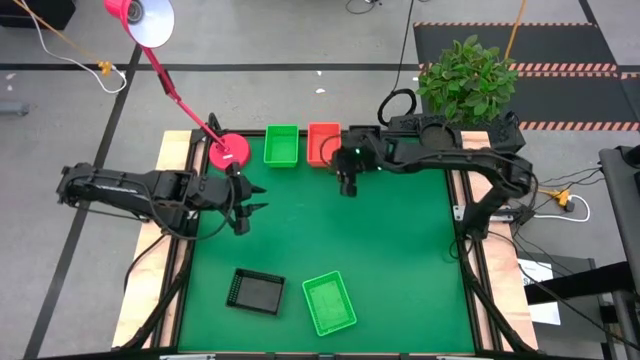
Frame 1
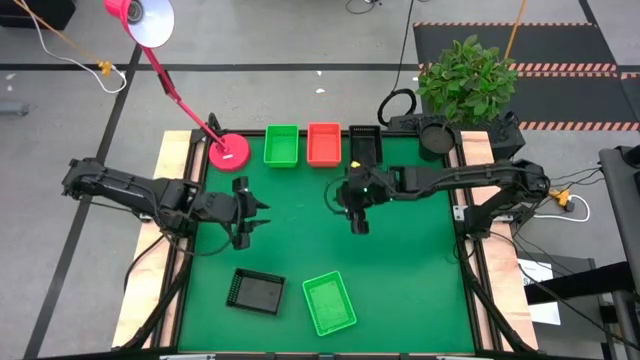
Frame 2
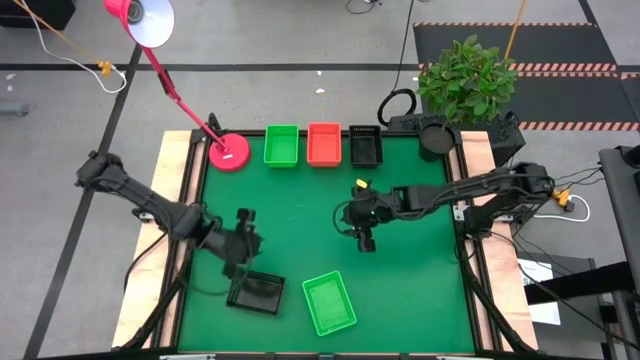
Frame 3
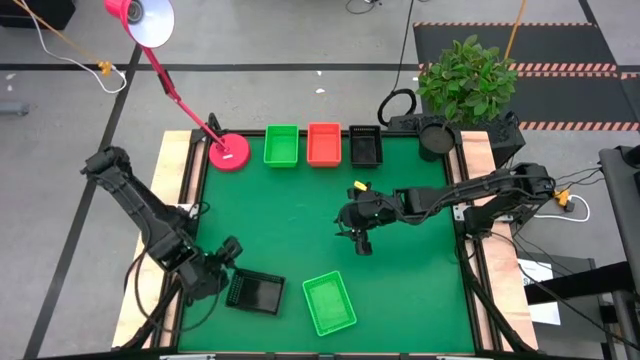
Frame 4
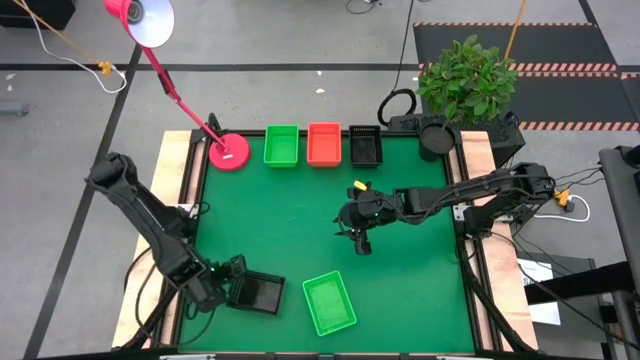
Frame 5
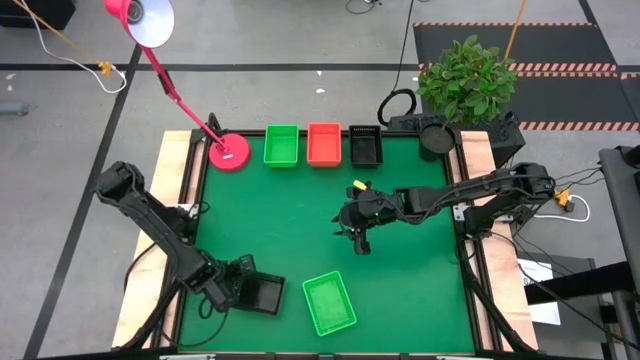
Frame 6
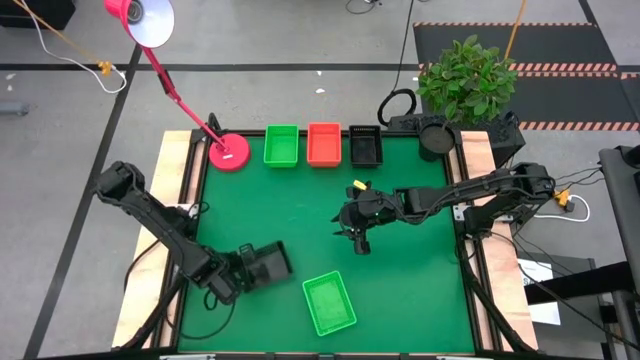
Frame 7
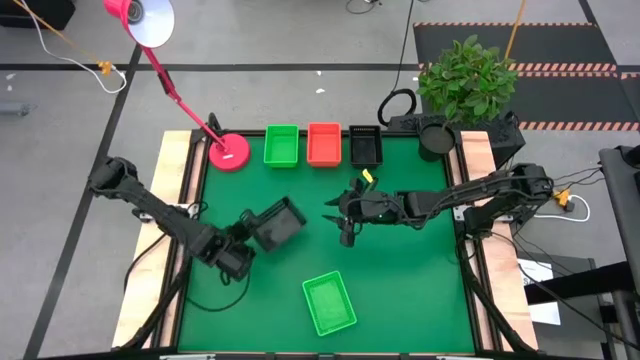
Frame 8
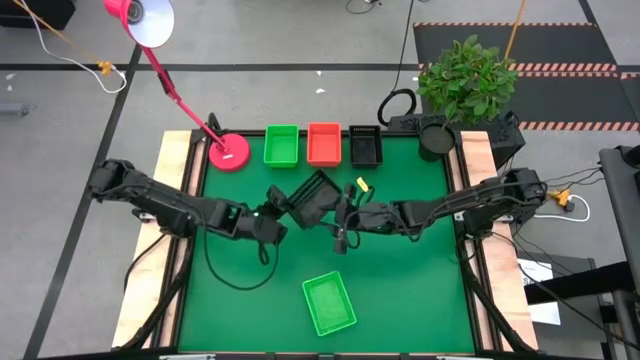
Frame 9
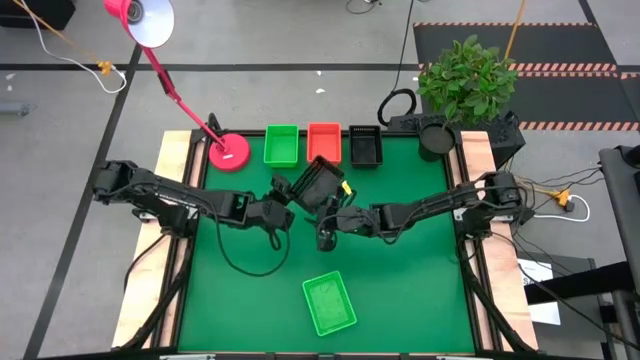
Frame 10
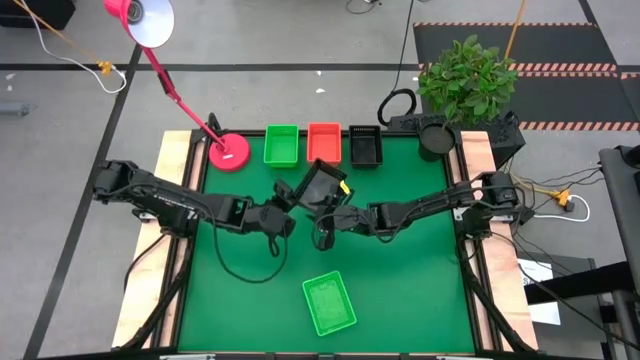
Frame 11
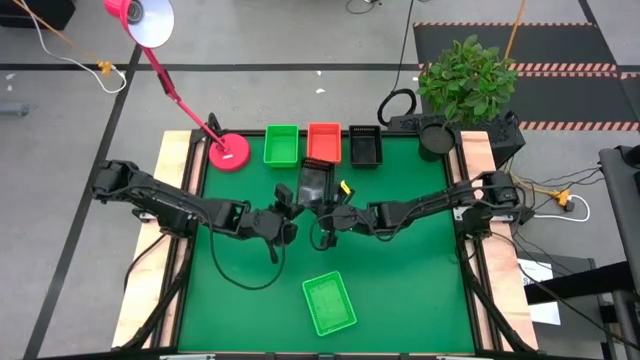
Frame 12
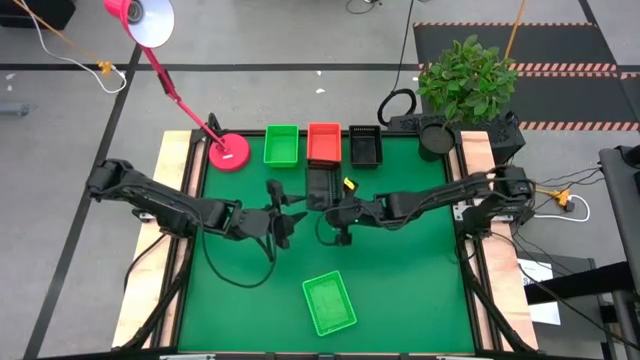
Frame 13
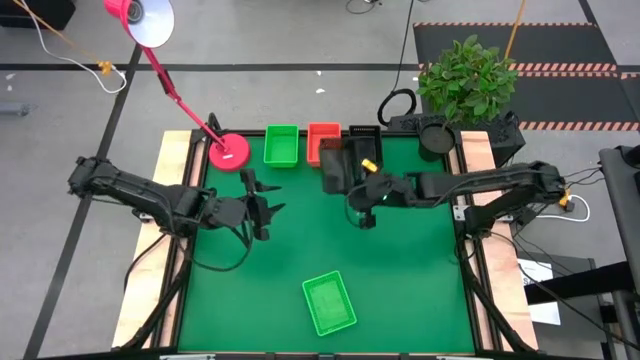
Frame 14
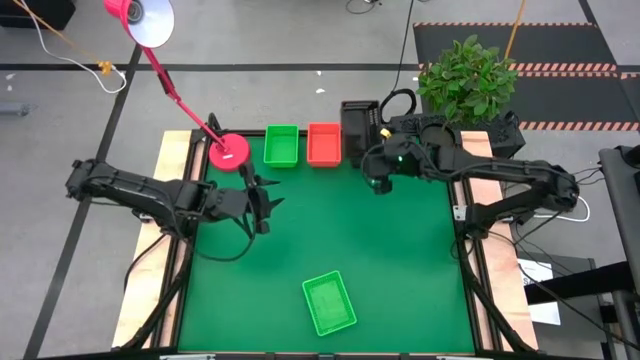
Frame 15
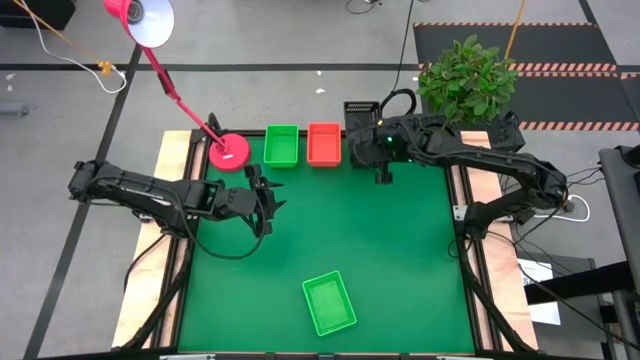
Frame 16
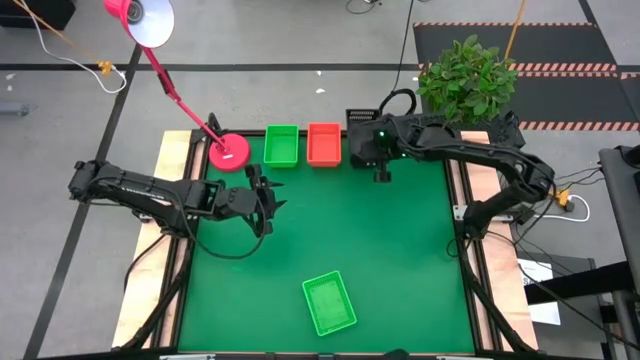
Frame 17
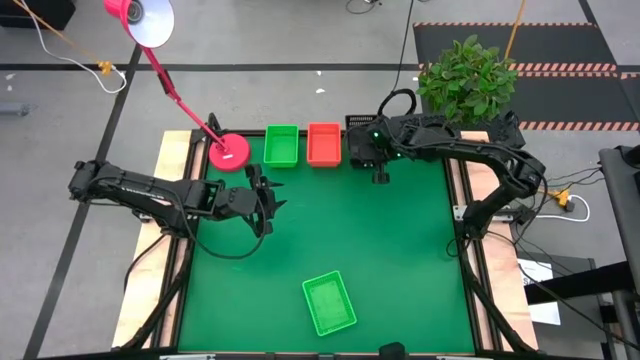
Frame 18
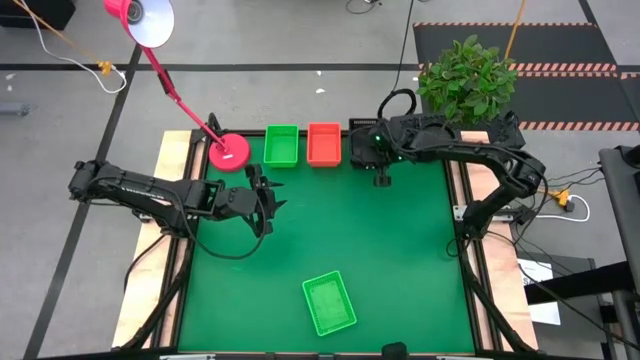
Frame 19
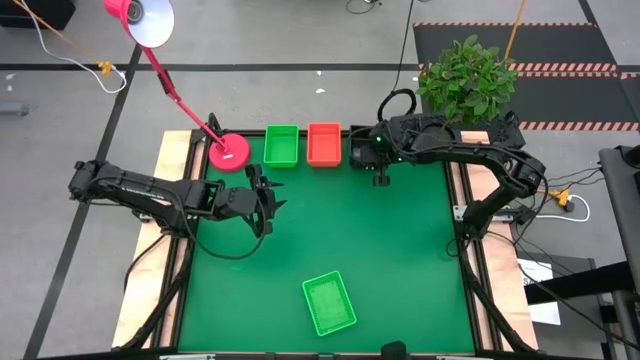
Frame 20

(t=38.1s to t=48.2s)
Stack the bottom black basket on top of the black stacked baskets

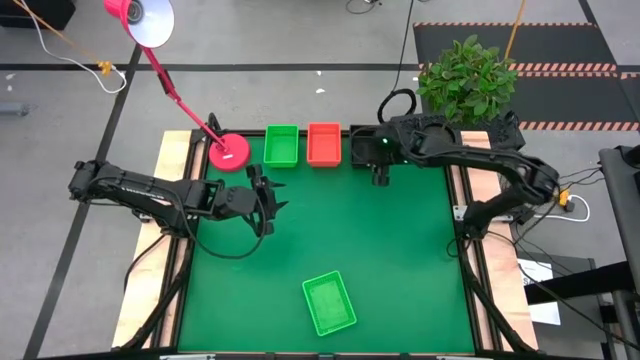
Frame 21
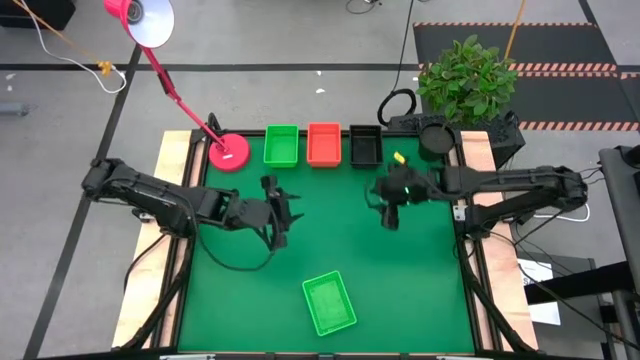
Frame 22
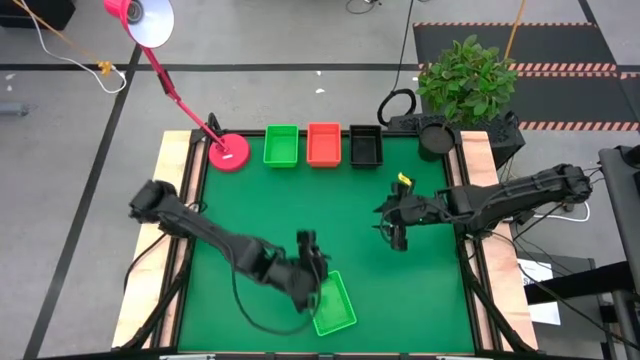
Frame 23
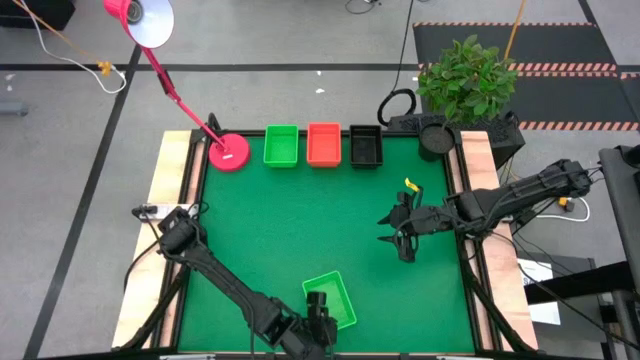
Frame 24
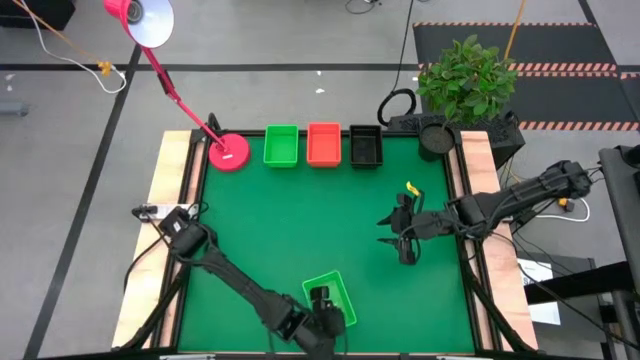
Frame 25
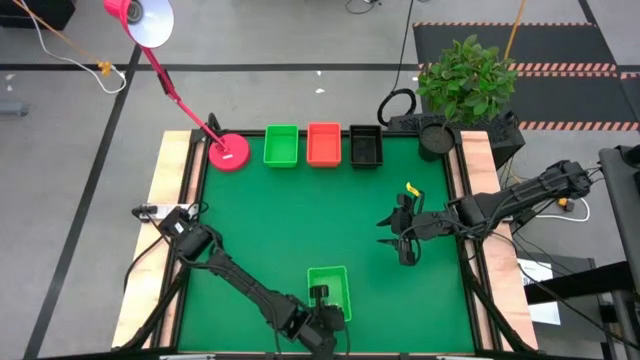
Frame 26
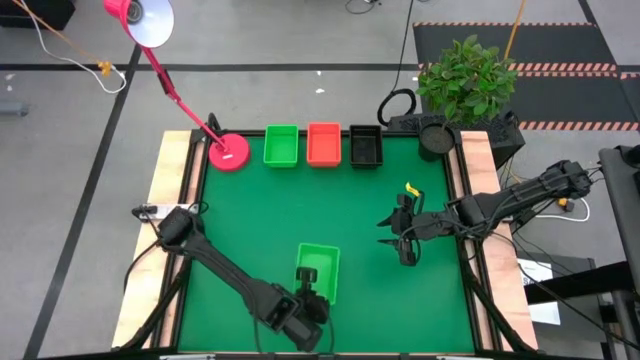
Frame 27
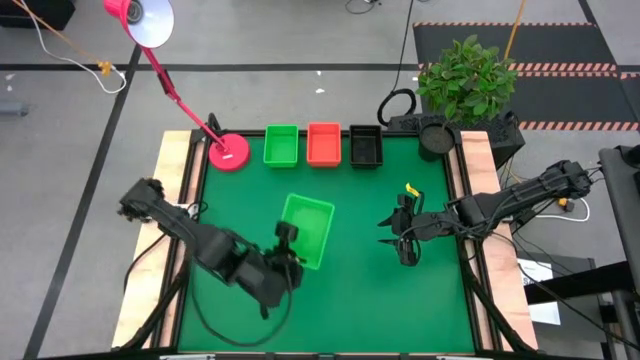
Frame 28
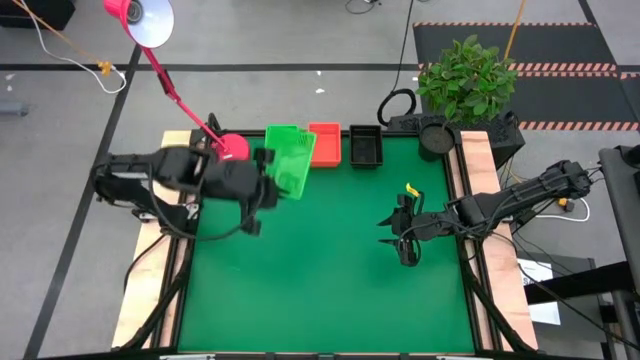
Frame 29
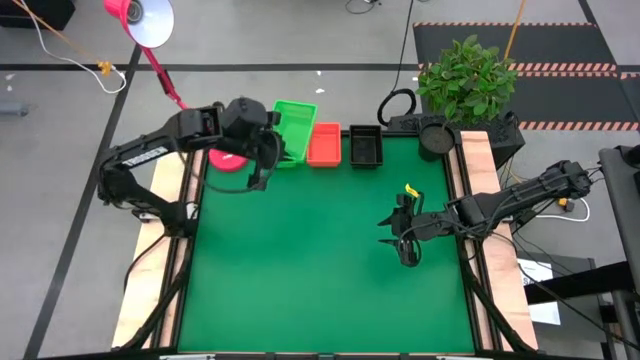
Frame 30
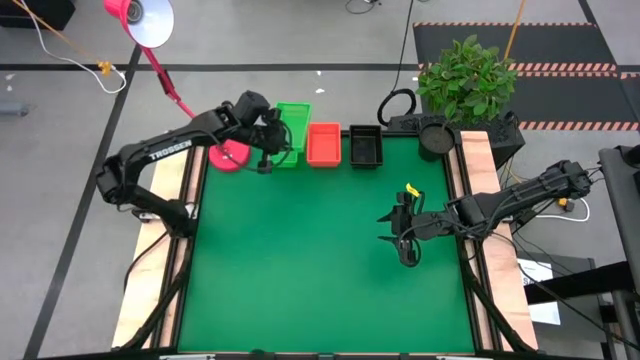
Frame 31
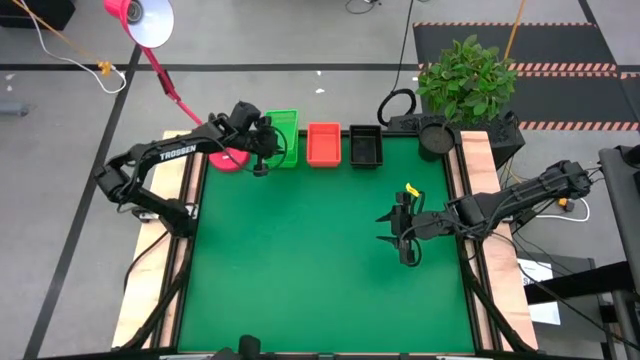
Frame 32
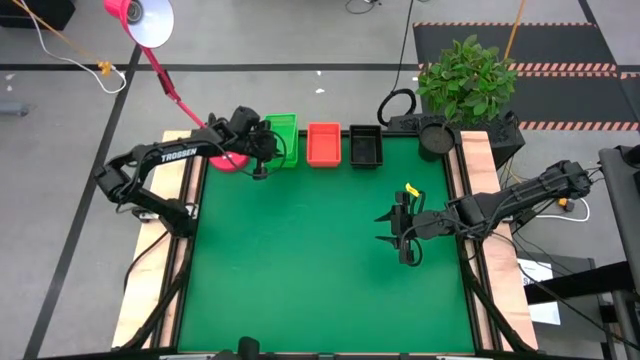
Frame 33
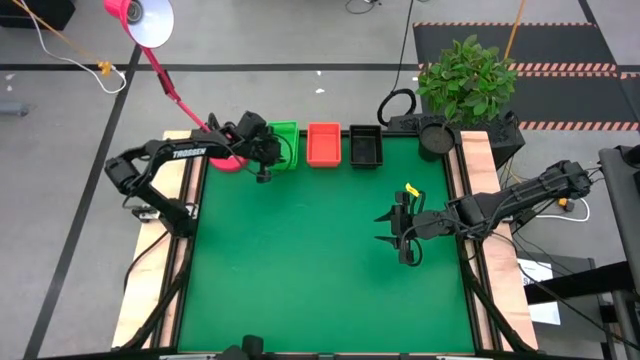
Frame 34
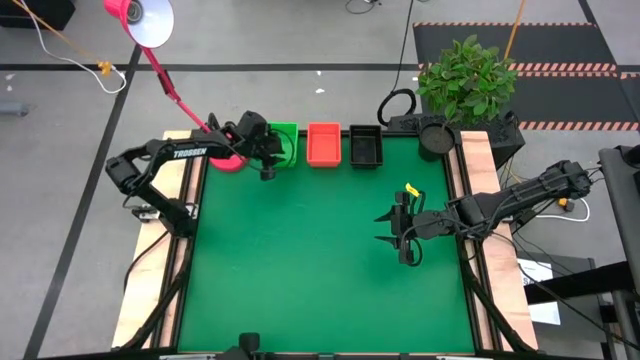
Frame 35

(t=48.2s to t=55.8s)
Stack the bottom green basket on top of the green stacked baskets
